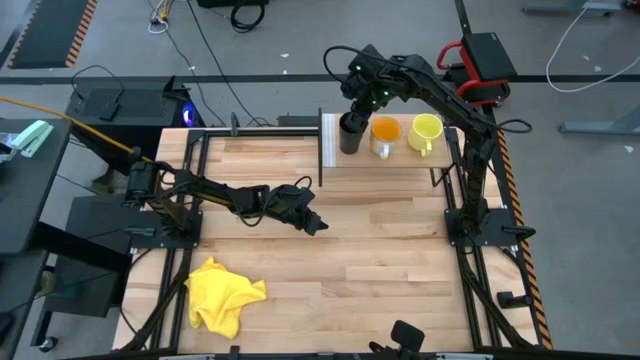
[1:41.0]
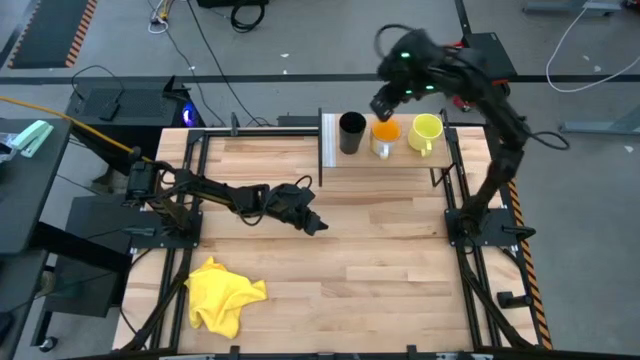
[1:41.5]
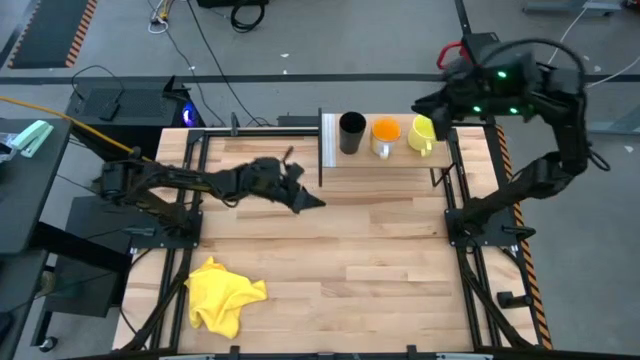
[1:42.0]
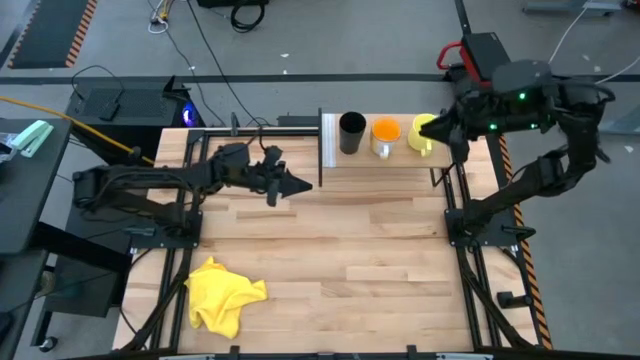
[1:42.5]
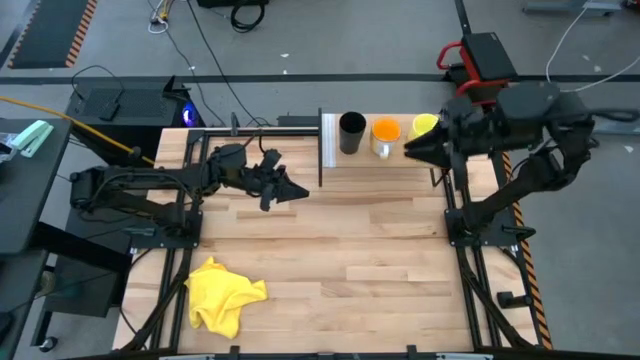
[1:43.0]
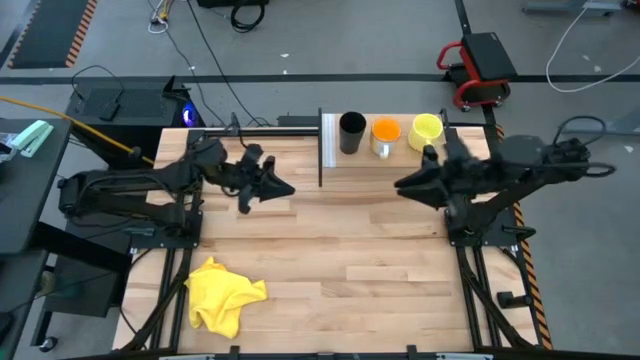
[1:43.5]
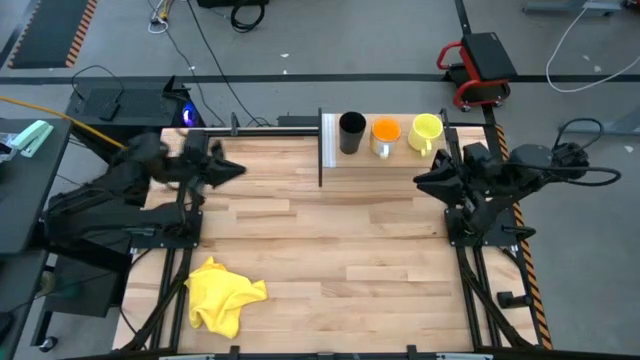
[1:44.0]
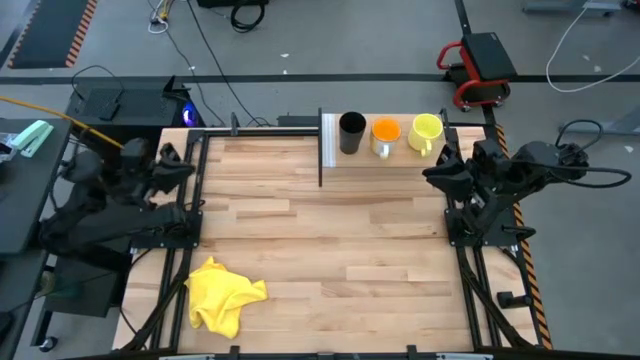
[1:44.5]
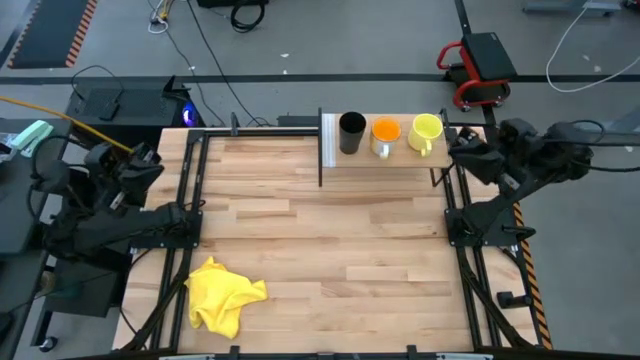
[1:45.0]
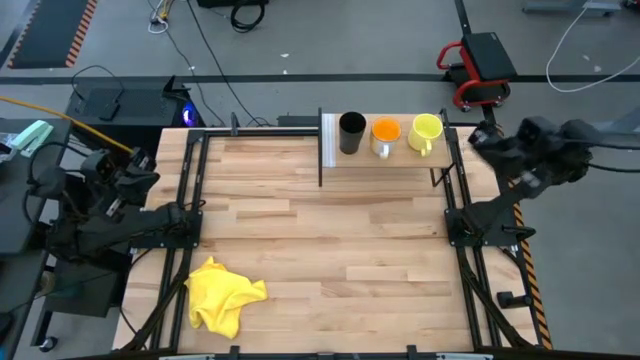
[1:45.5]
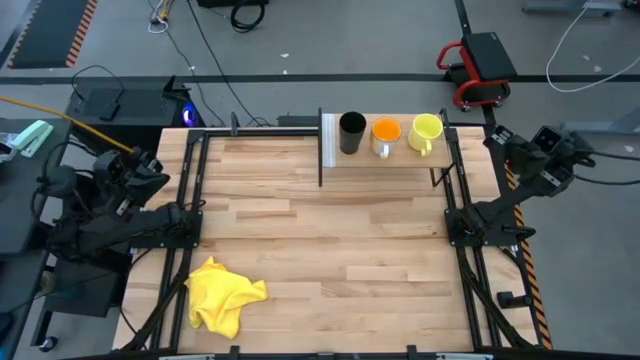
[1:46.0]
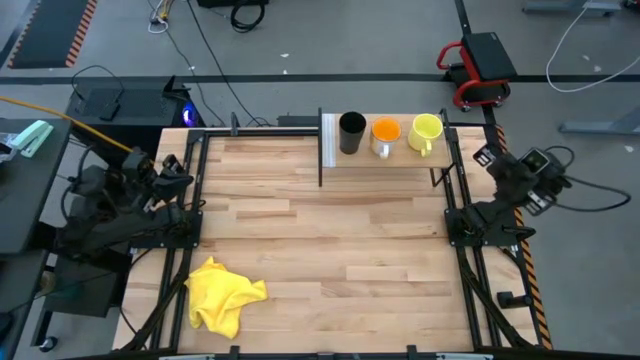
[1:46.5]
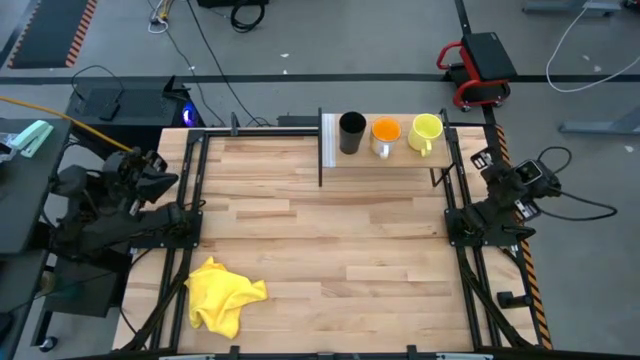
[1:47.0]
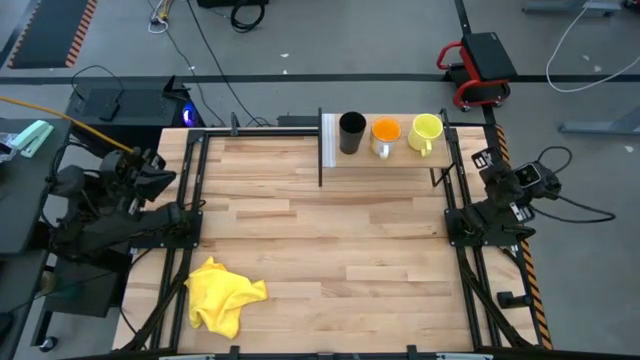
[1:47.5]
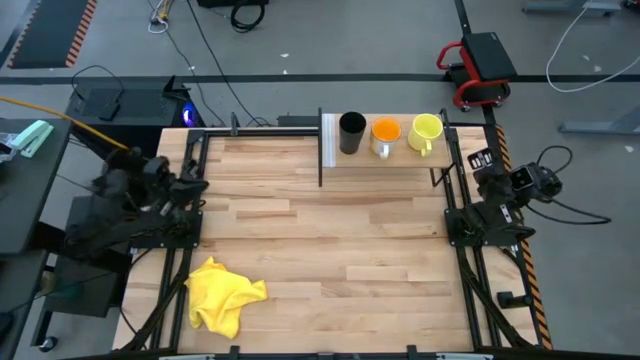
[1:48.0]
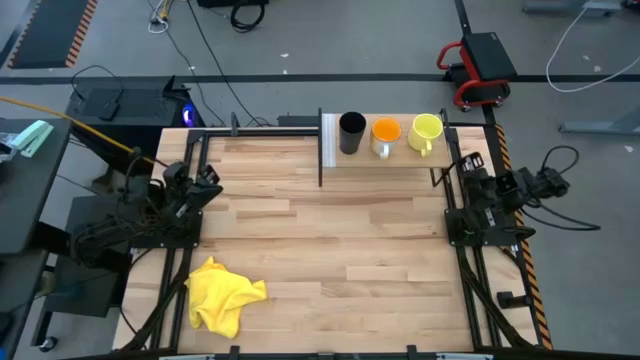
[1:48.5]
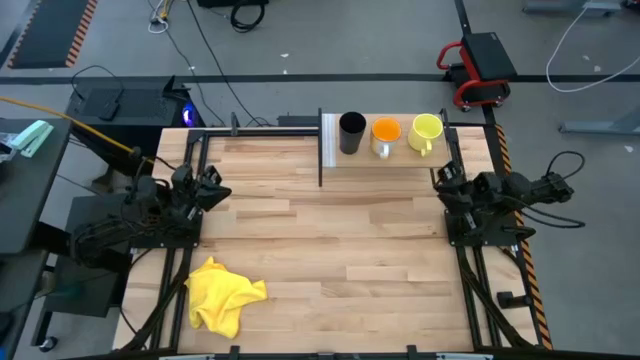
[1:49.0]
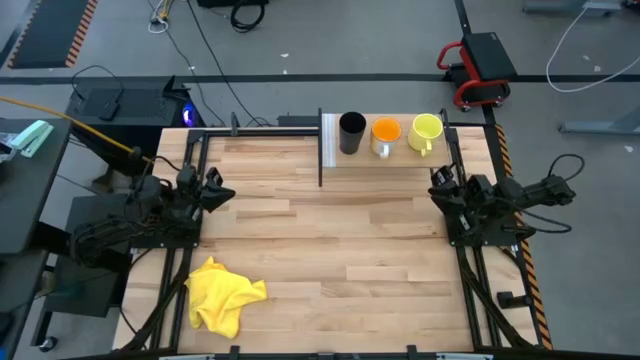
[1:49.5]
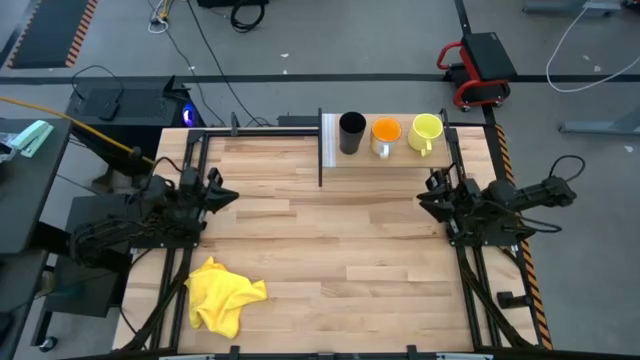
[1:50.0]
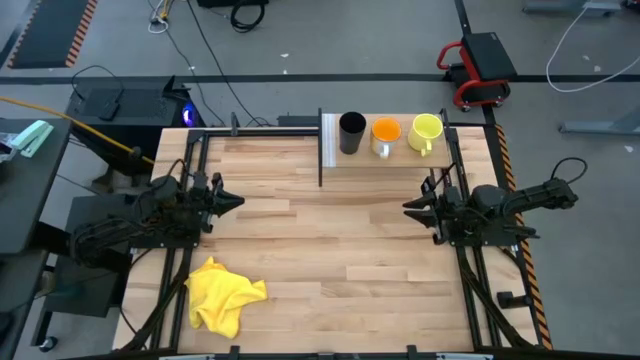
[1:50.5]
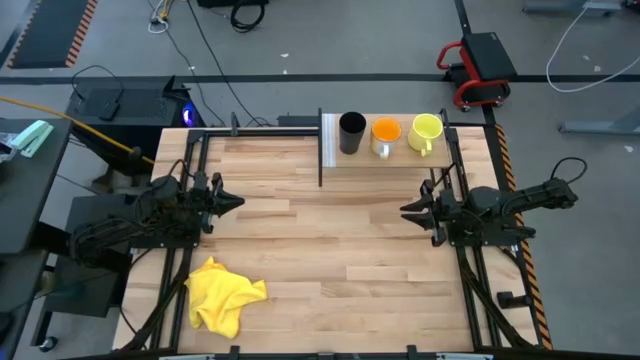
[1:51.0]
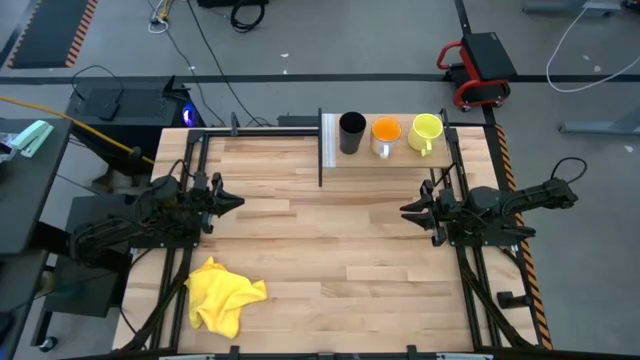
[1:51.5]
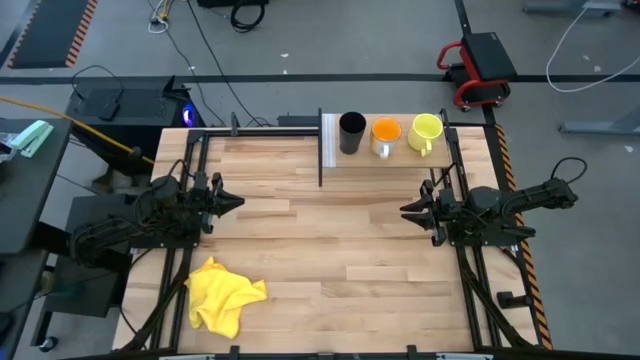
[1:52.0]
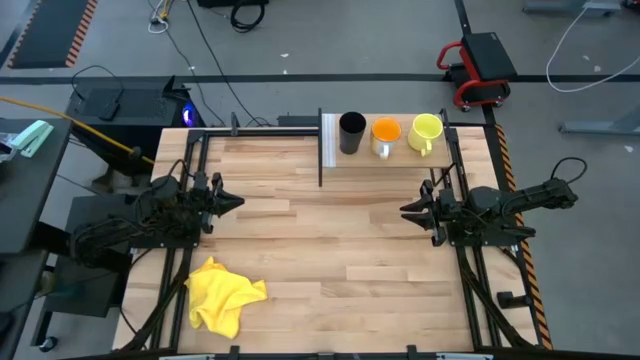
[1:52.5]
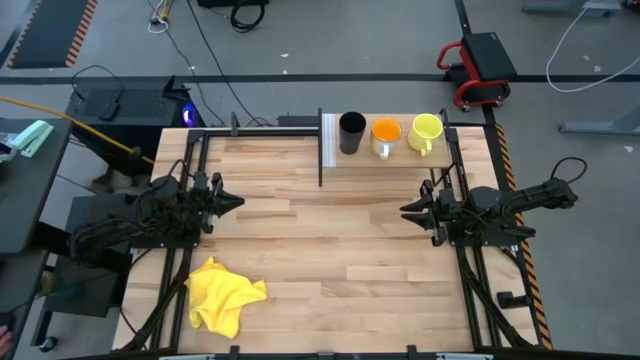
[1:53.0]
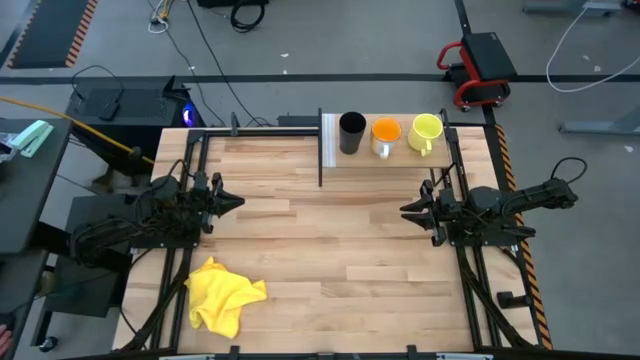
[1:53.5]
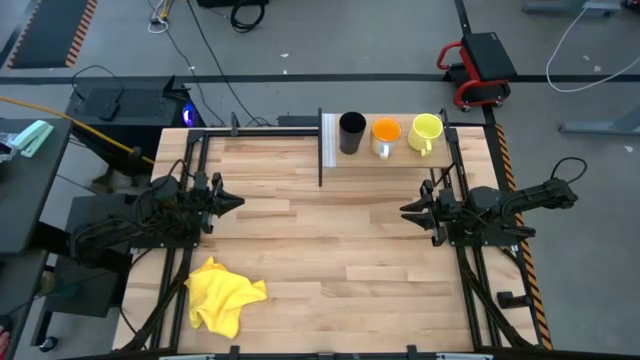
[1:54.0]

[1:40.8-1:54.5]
Task: Stack small to large cups/mugs on shelf
Return to Home Position

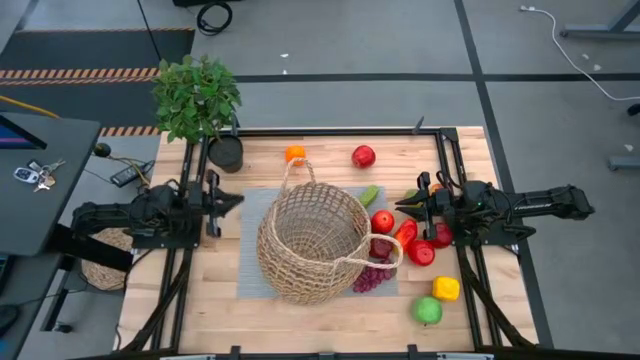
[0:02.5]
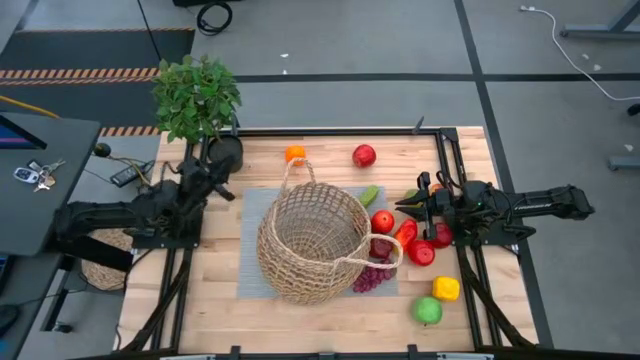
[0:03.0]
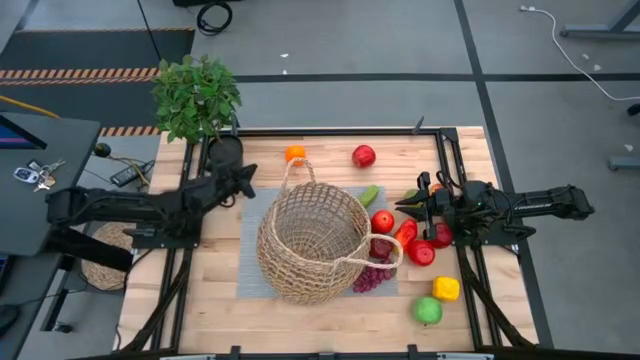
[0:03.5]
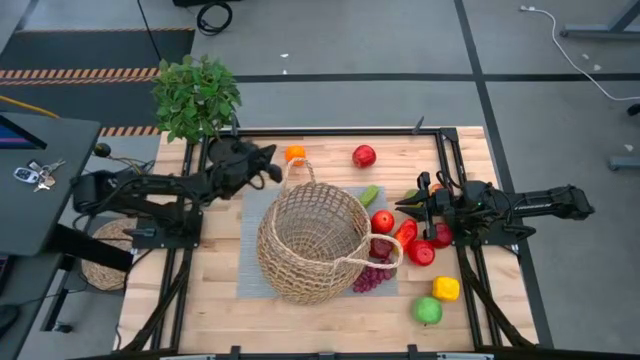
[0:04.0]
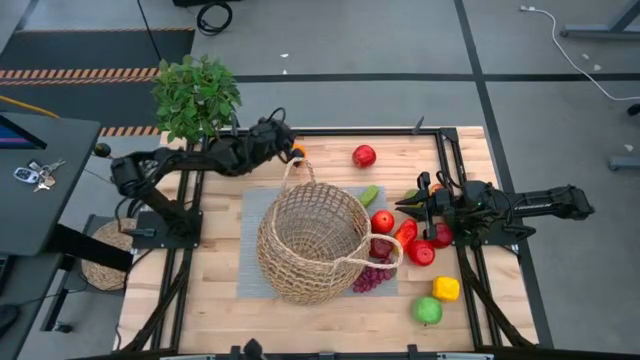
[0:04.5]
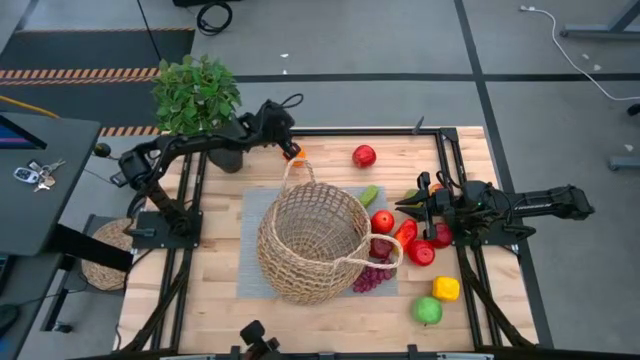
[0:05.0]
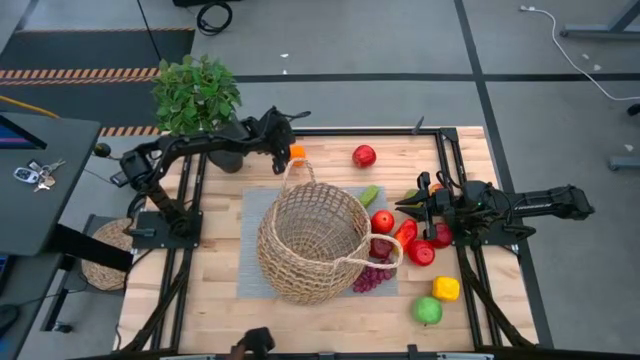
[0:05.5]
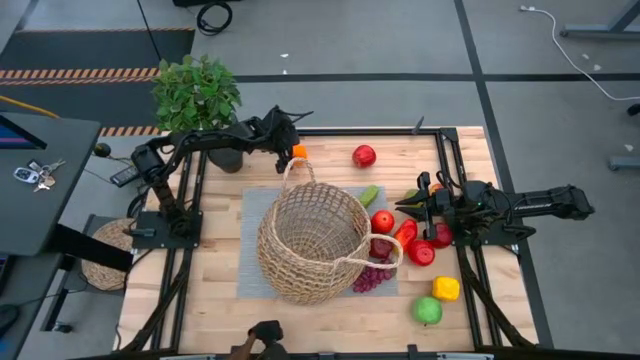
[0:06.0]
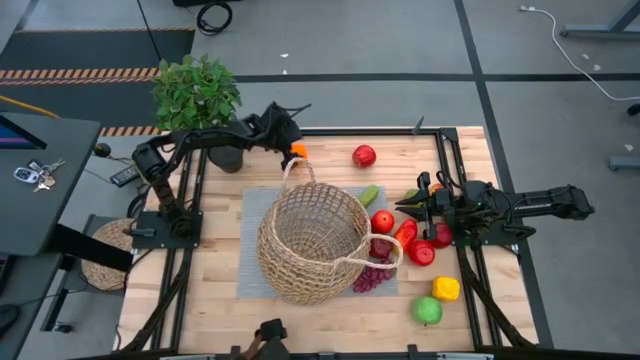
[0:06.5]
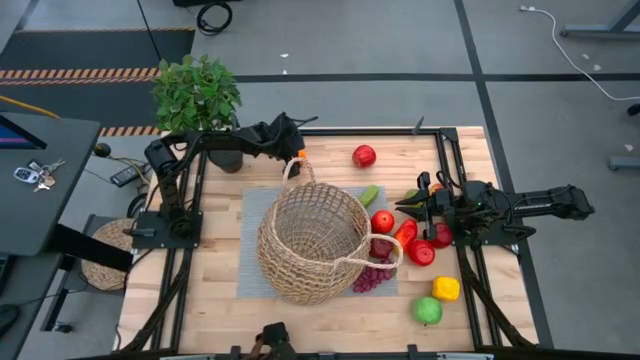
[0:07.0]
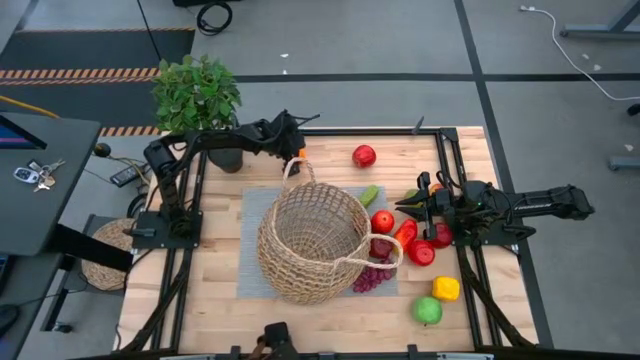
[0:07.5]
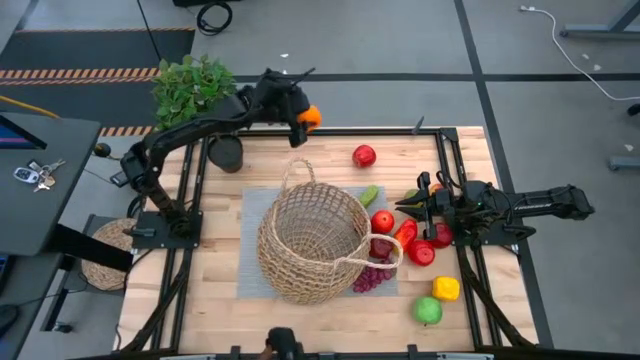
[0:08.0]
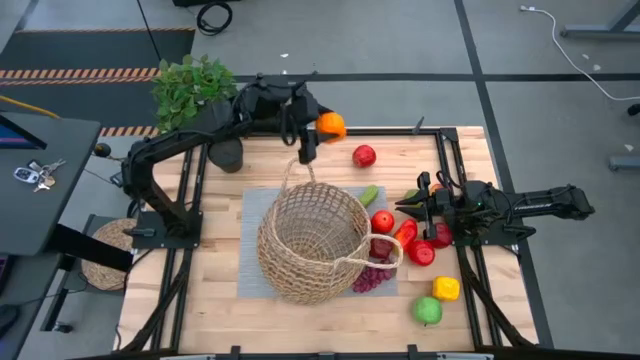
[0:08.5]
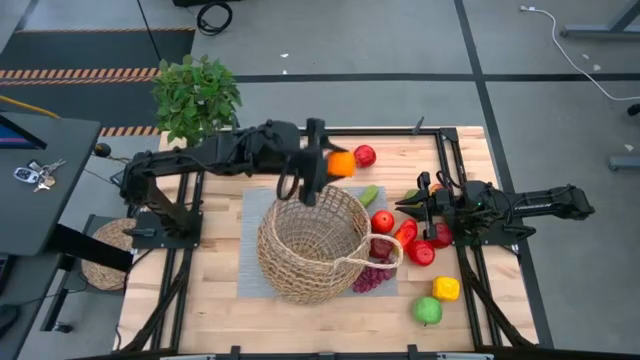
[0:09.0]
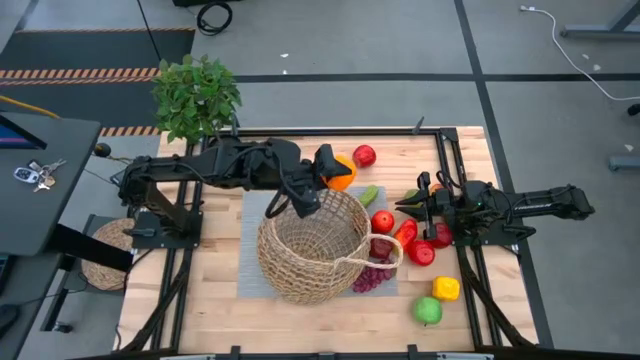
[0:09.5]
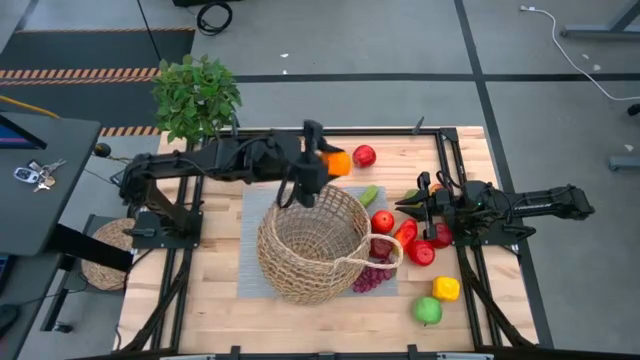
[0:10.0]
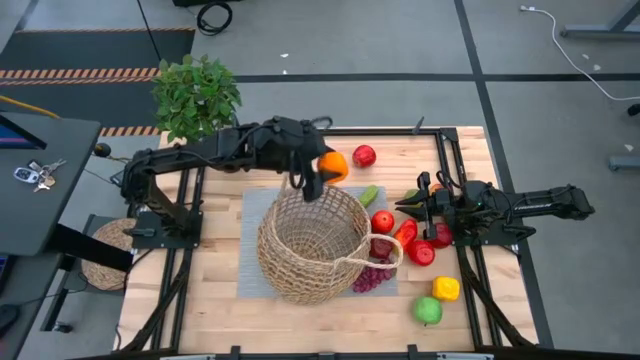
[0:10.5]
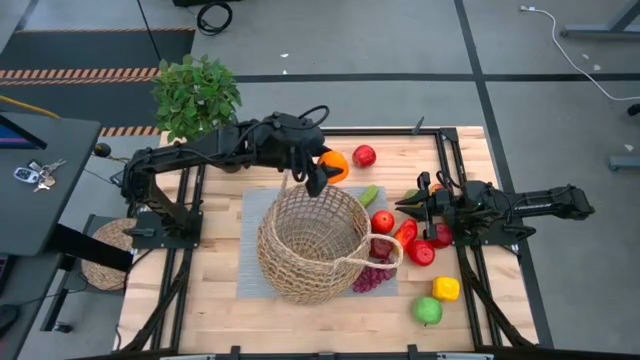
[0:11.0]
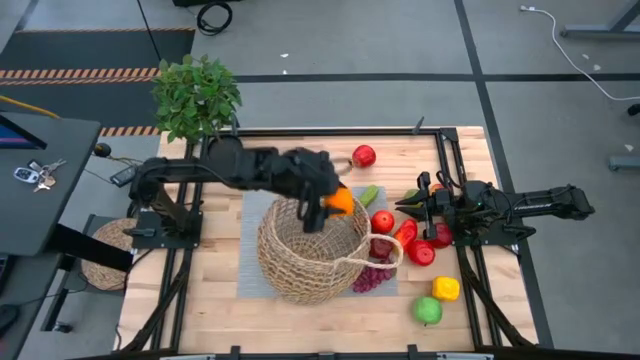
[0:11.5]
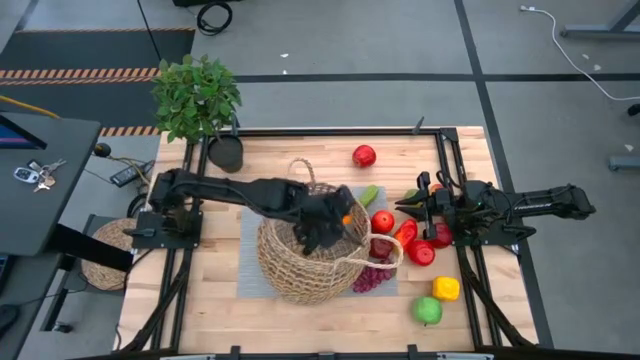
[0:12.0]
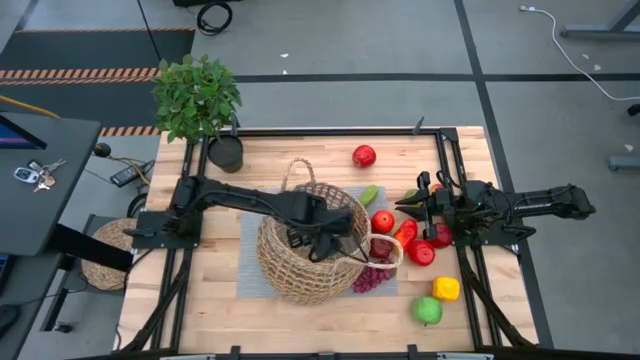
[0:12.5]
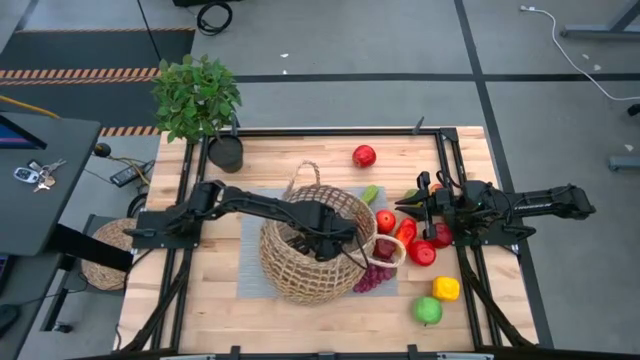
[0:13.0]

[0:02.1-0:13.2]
Task: Build produce basket
Put the orange into the basket
